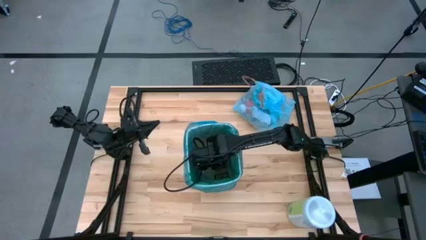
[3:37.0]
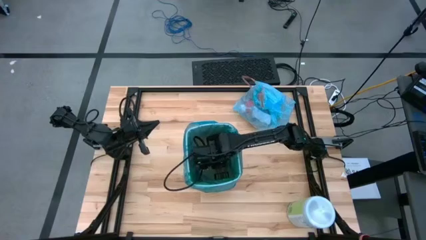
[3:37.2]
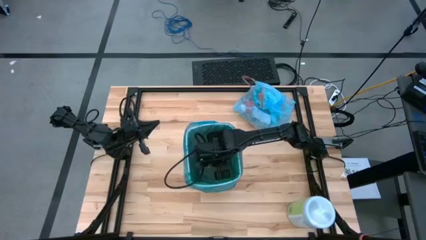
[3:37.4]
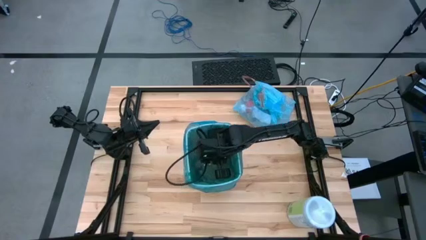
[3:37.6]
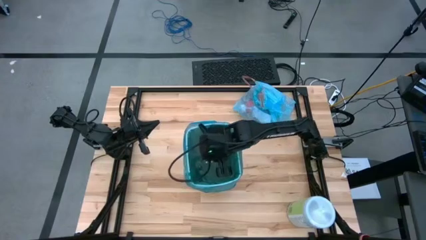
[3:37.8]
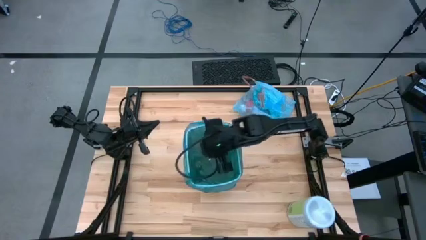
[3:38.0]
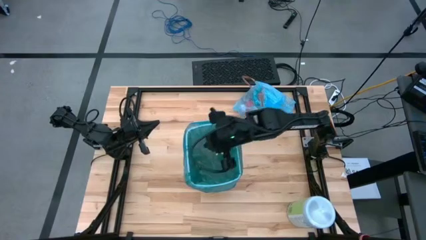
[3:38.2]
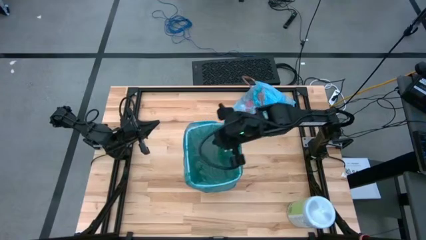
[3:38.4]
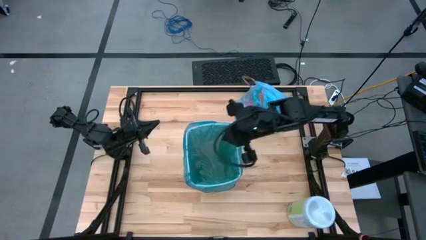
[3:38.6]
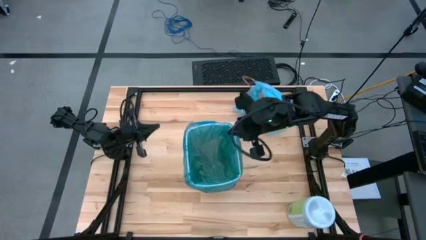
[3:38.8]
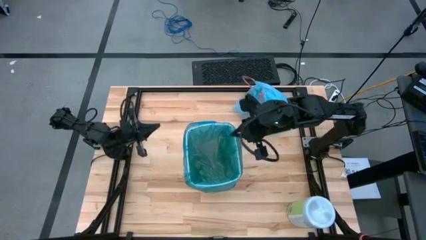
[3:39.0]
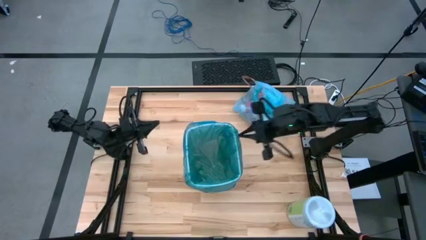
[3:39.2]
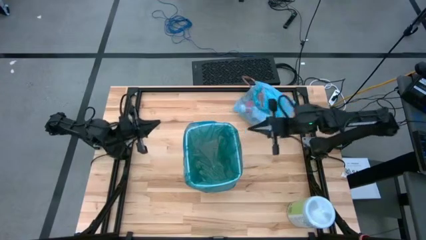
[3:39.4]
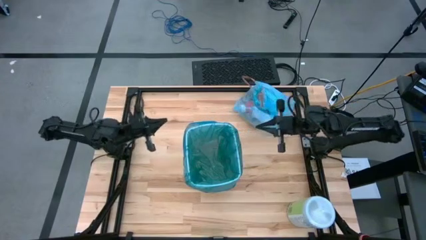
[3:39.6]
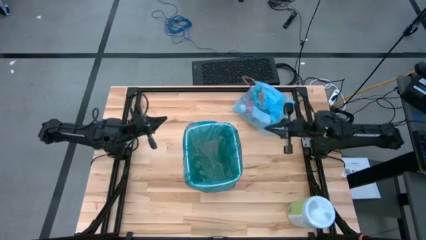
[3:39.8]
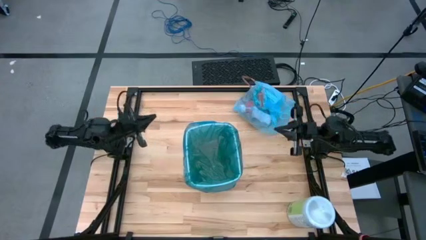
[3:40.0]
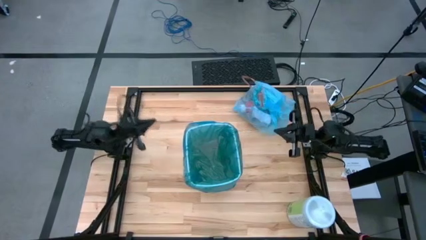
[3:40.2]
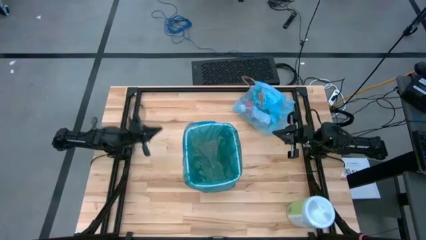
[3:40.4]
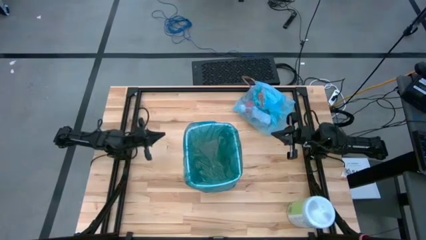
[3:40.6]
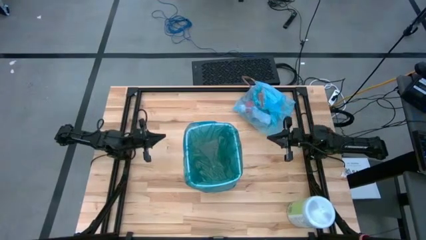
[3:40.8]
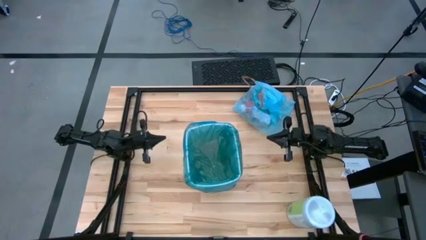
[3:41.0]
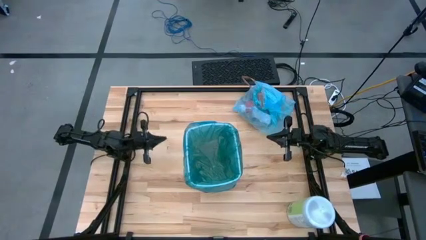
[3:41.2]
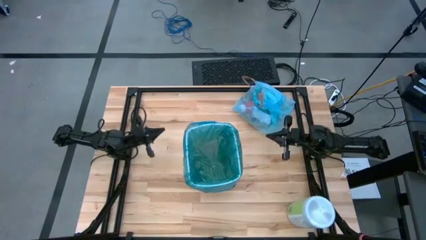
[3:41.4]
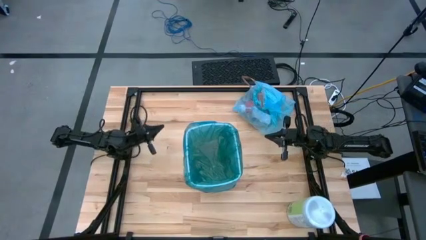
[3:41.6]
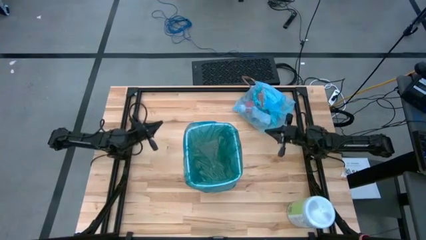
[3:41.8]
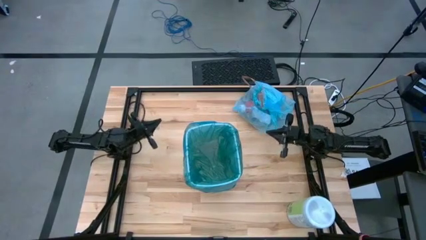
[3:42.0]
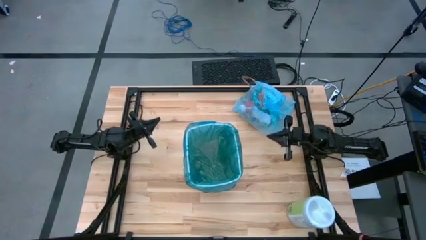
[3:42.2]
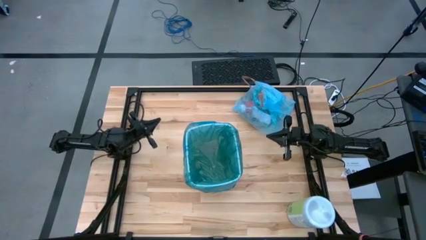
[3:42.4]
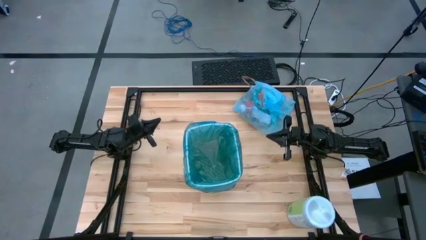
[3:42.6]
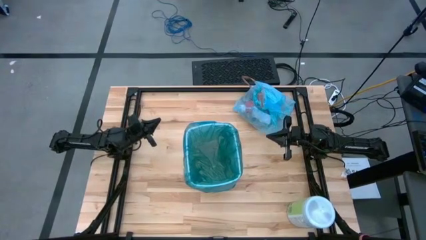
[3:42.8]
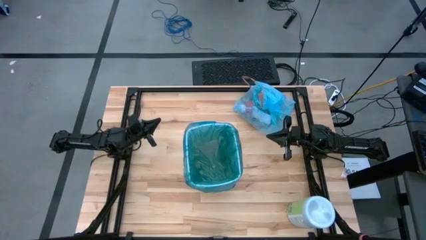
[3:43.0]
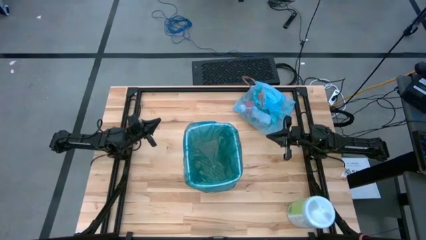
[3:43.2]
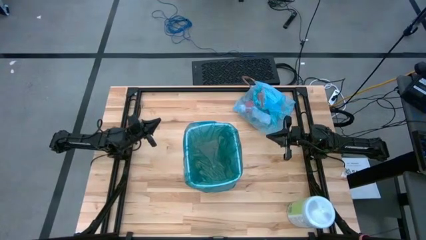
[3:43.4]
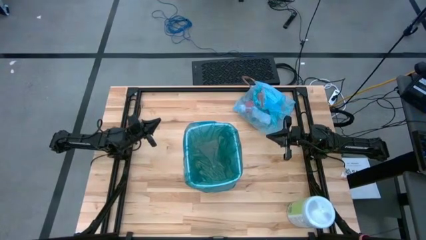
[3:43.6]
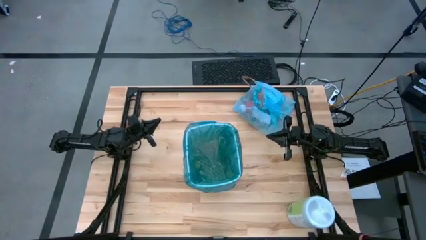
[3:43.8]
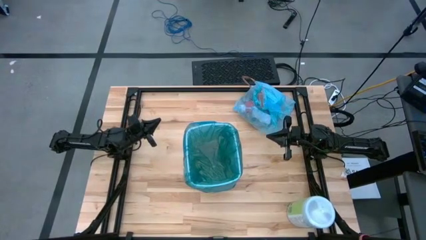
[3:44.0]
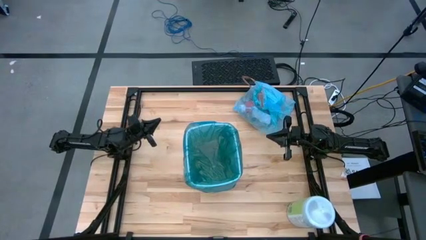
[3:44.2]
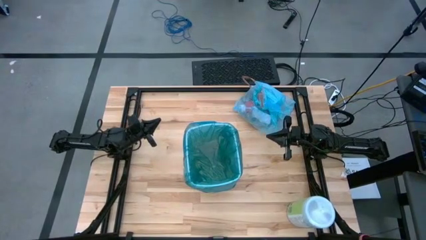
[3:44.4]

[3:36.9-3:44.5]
Task: place trash/remove bag and relplace
Return to Home Position

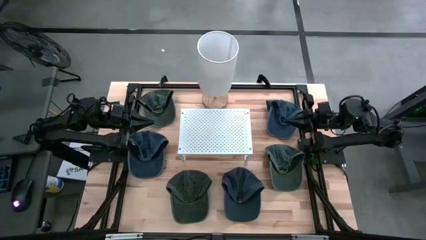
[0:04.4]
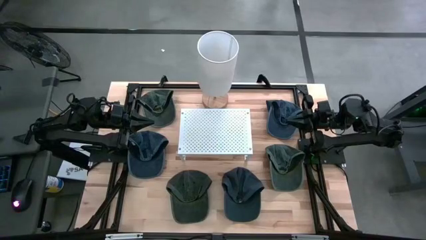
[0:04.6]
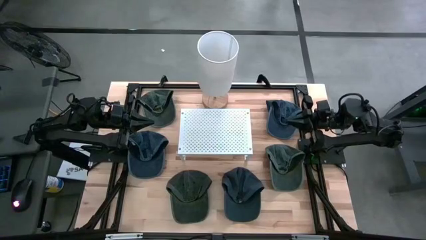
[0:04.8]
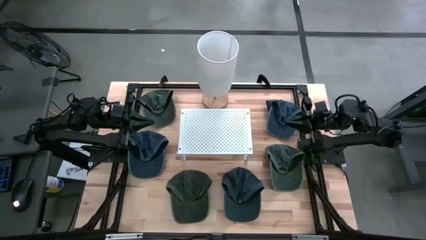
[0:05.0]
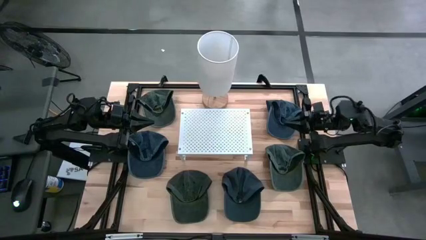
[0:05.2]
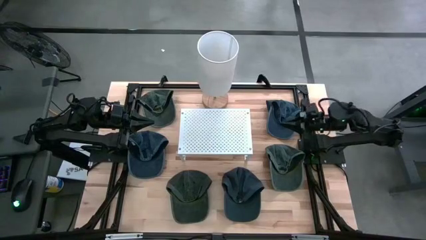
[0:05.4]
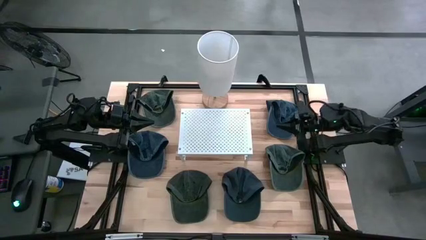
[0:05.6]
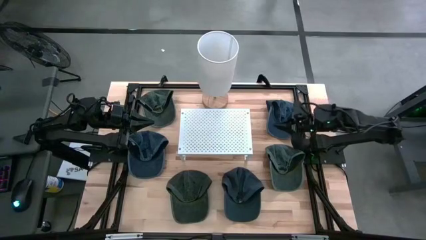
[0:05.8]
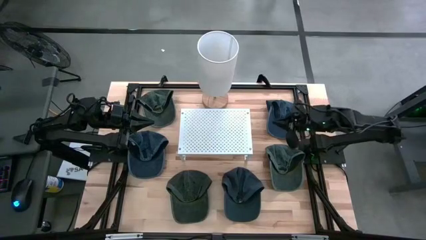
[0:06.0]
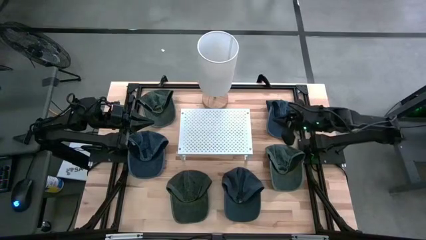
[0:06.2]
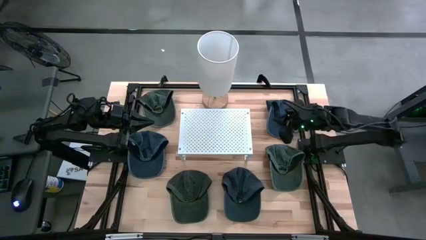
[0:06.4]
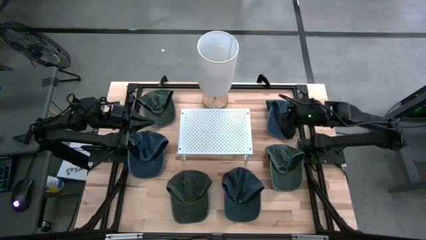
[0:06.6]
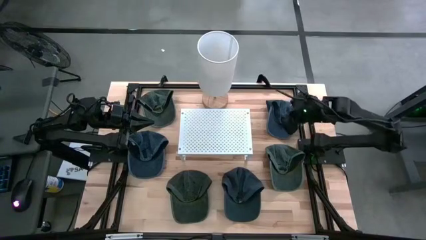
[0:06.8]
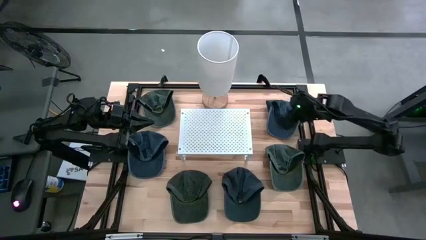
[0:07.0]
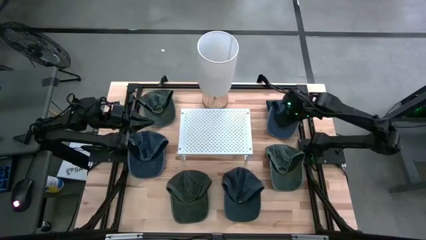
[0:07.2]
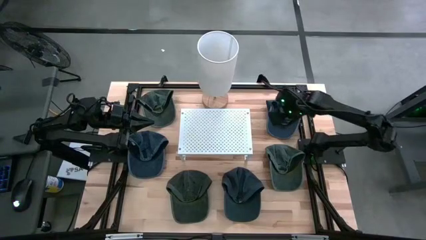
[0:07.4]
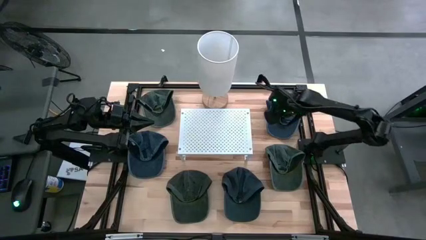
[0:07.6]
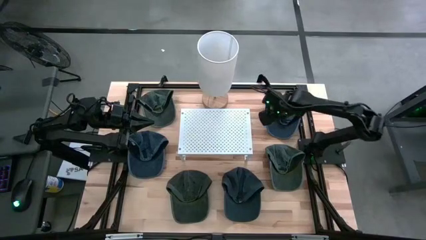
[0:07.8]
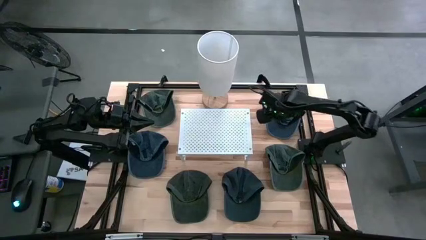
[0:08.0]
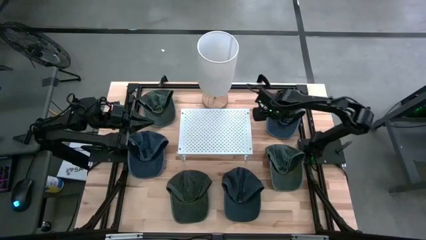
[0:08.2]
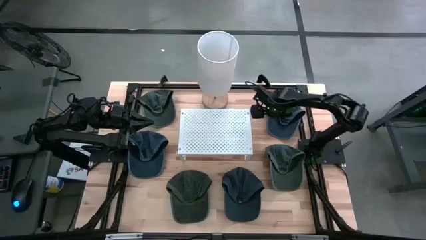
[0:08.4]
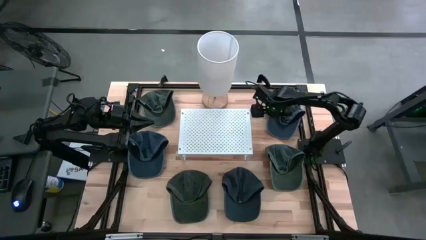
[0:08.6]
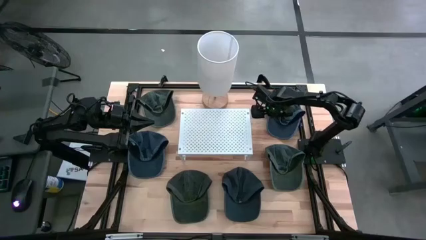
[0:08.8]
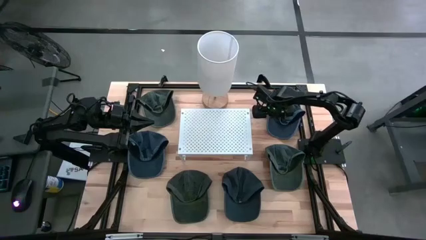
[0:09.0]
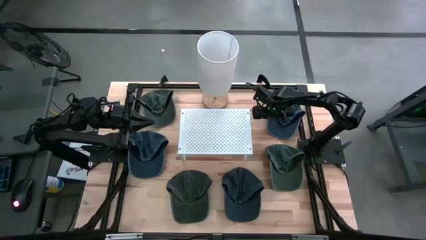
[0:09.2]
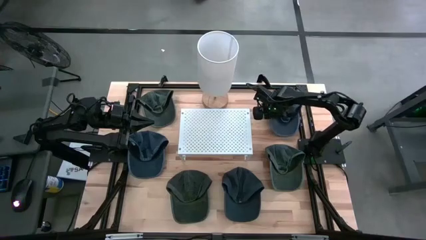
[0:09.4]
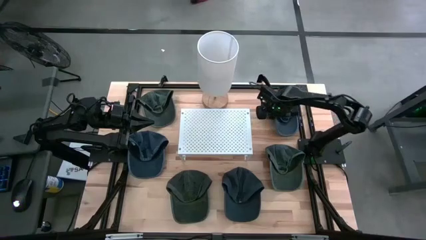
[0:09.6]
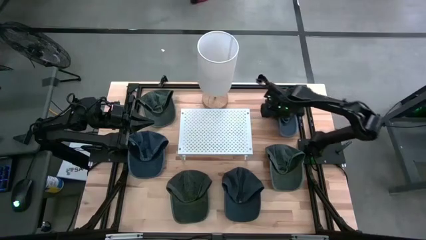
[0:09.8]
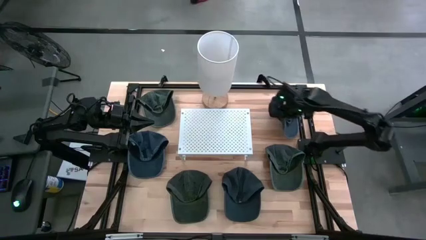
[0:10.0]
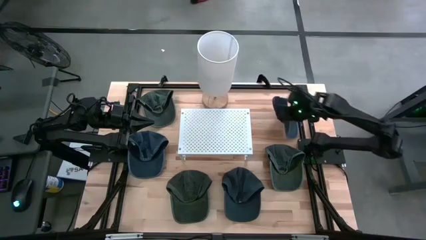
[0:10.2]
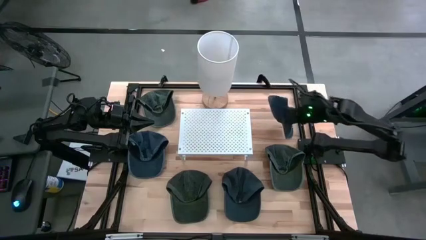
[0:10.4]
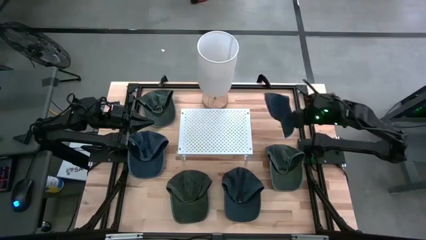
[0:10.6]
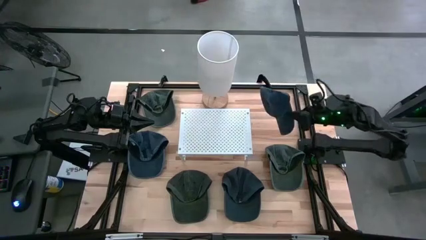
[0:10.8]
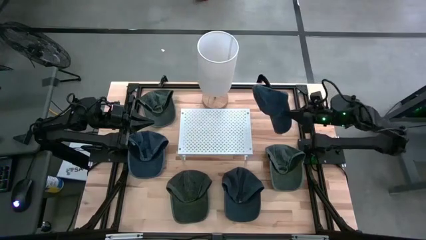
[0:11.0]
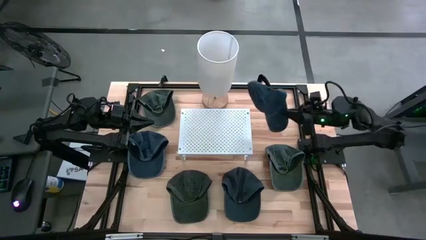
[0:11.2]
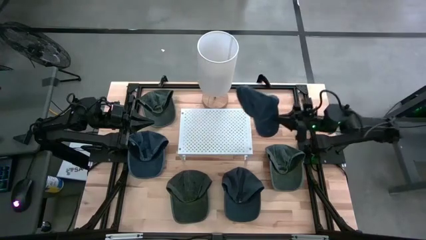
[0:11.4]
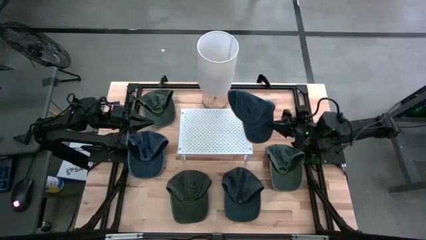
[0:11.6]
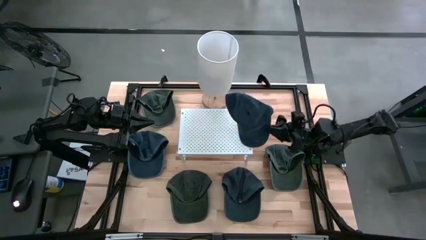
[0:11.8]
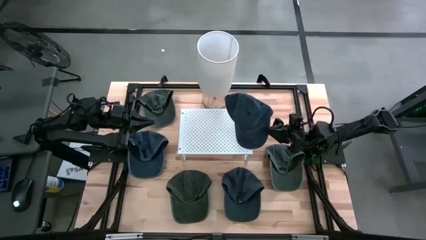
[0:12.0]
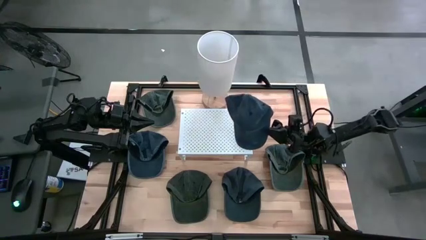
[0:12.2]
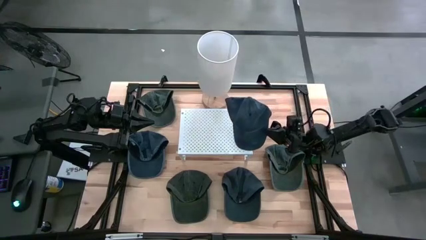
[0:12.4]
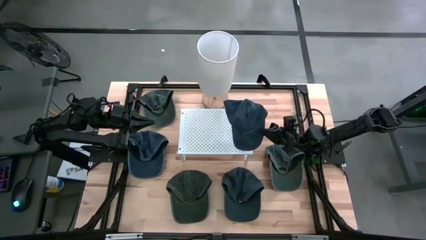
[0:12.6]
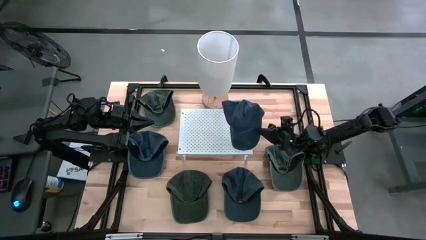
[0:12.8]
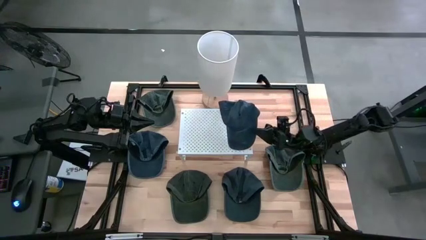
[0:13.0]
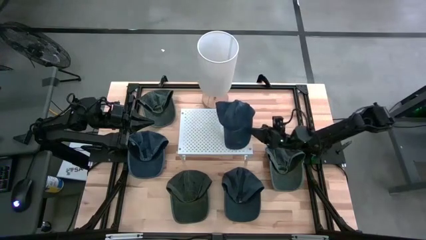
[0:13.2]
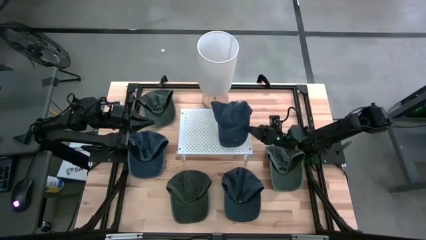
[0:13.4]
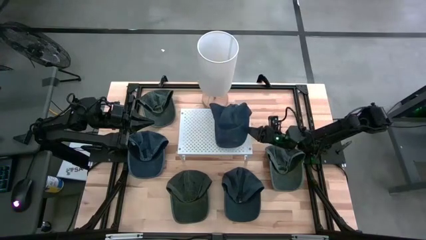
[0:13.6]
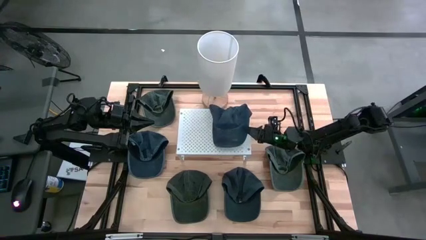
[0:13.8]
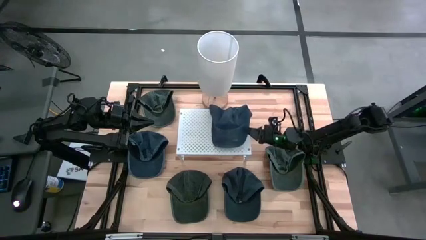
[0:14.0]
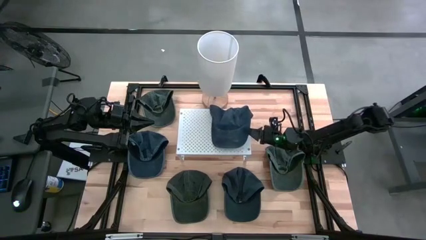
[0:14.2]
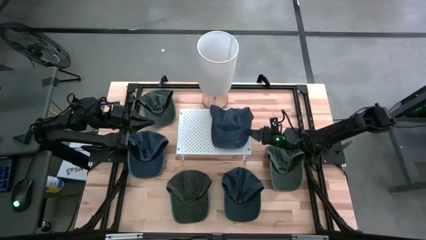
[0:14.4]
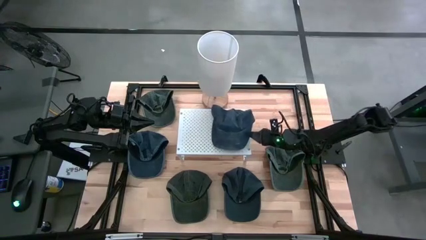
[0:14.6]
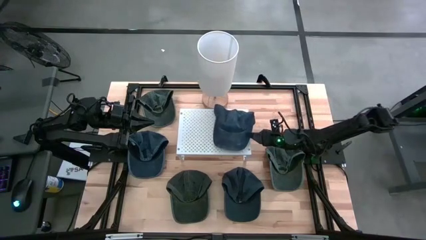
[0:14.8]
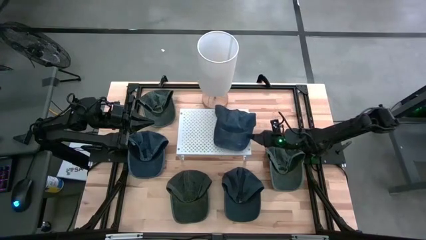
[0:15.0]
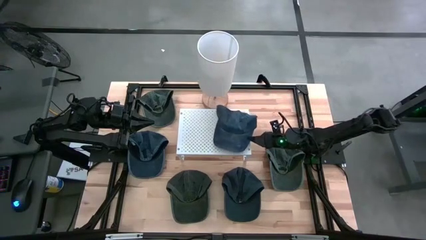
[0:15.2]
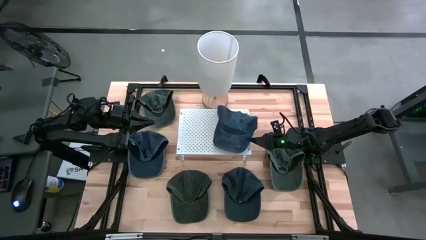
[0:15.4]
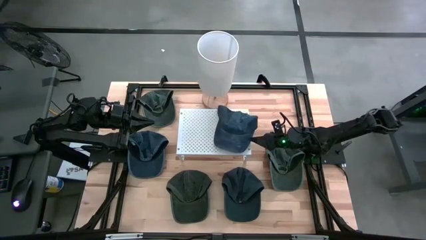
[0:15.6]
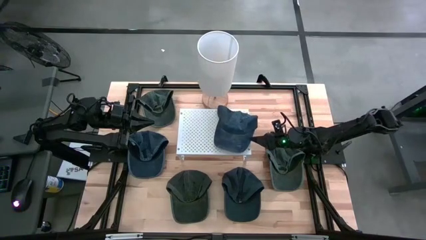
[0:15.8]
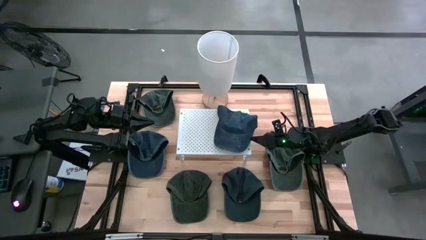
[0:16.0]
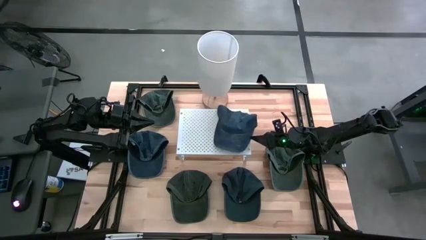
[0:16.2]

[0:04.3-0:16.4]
Task: Pick & Place hat
Put the top right blue cap on the shelf
